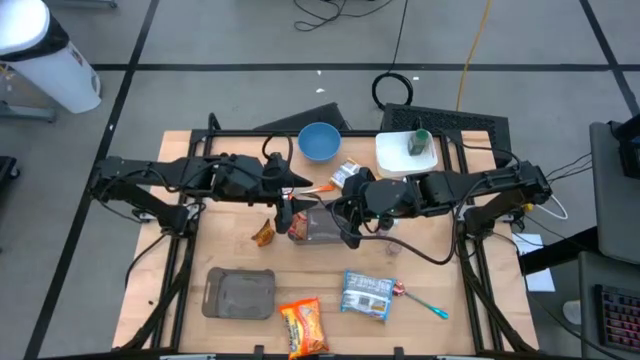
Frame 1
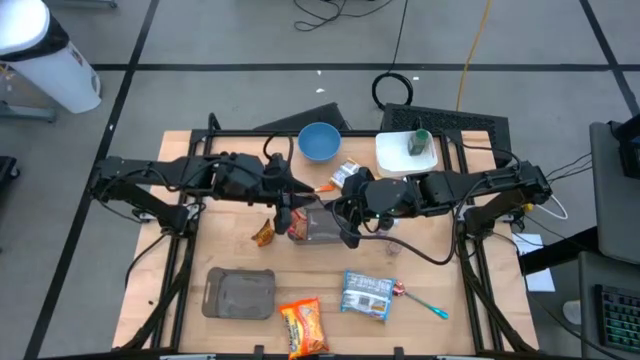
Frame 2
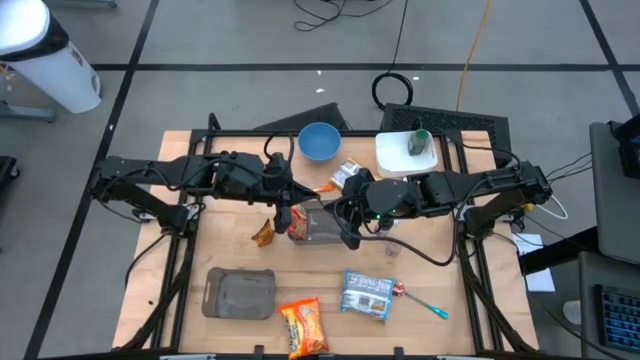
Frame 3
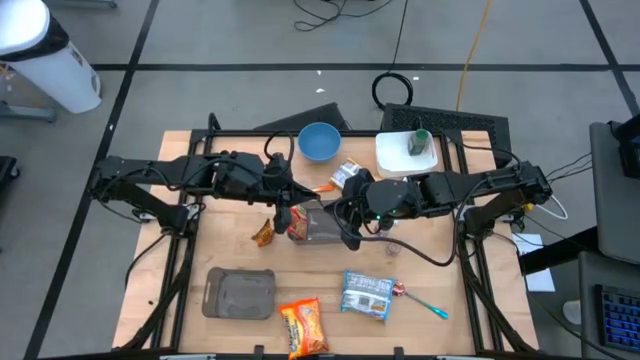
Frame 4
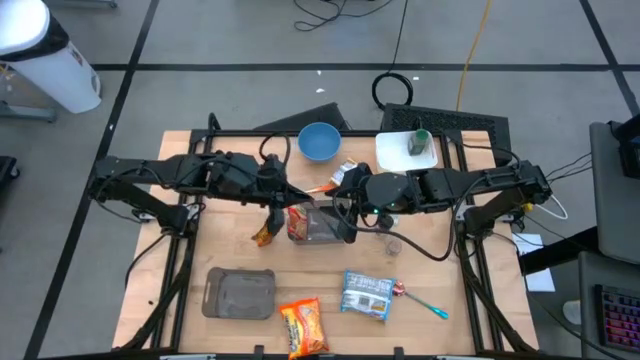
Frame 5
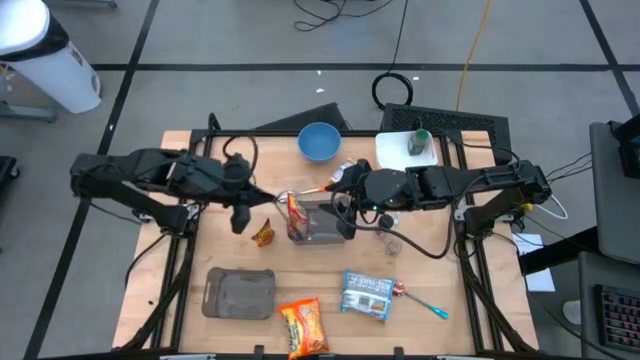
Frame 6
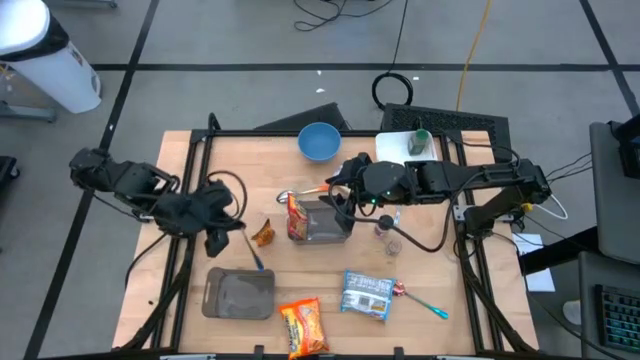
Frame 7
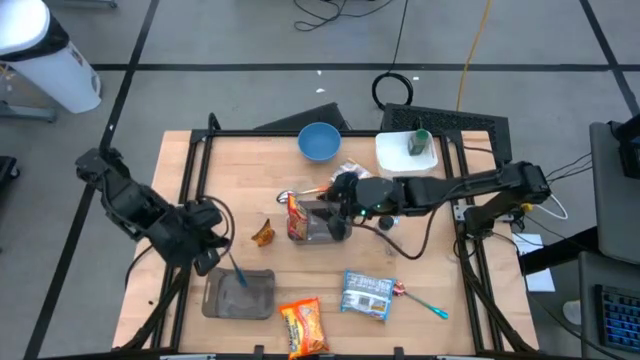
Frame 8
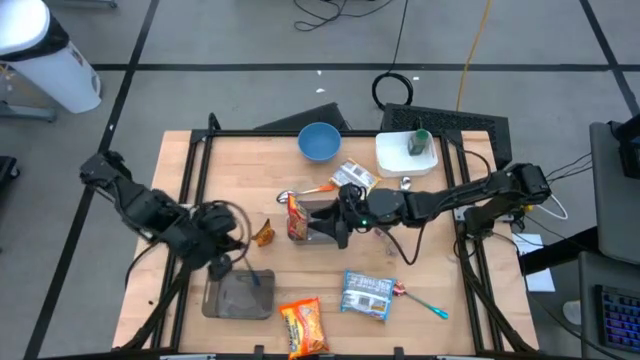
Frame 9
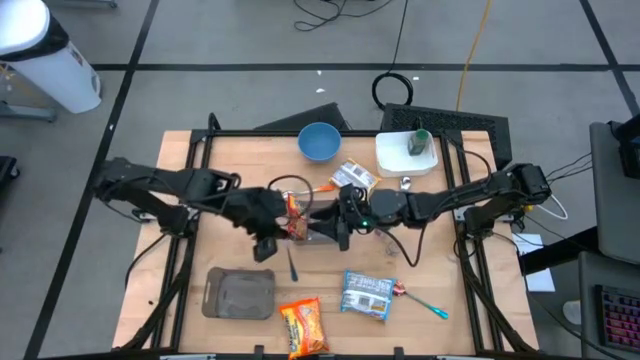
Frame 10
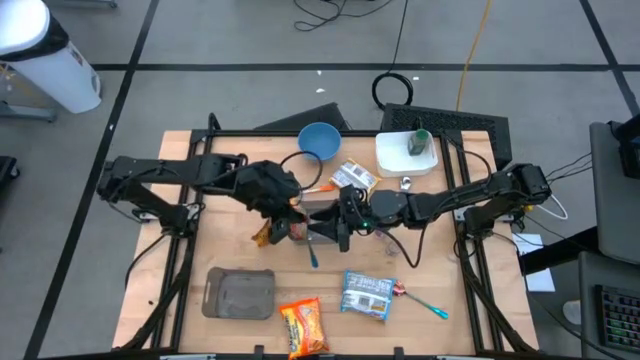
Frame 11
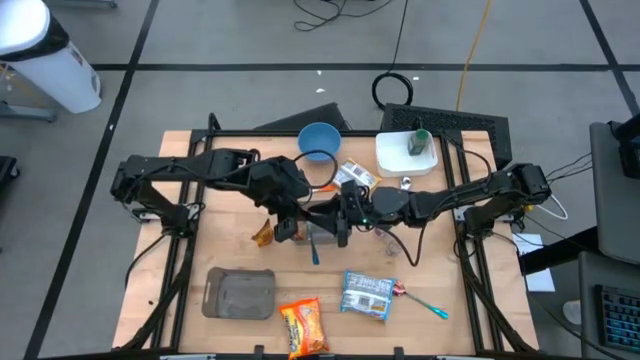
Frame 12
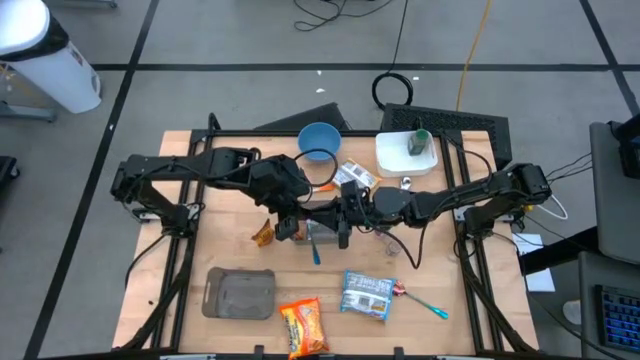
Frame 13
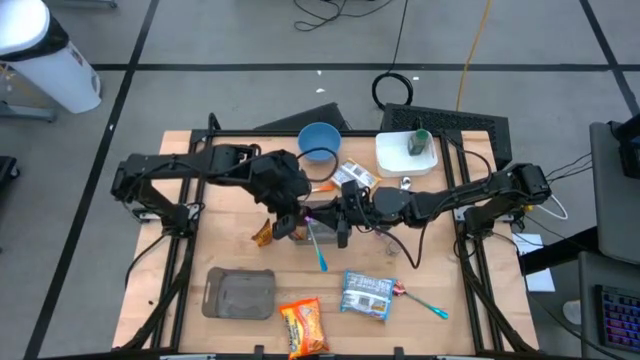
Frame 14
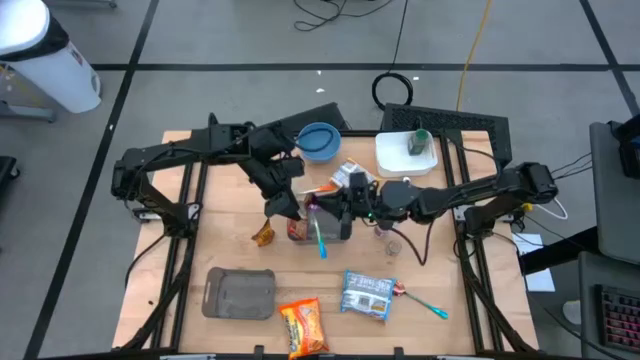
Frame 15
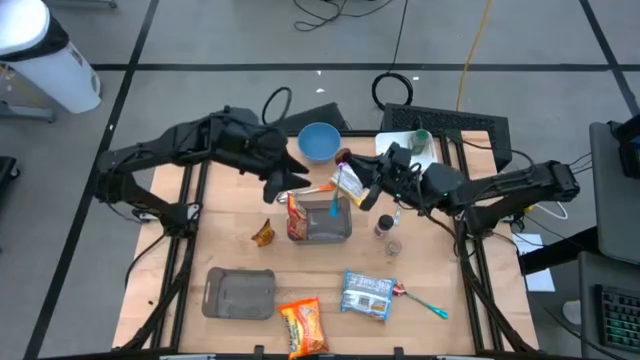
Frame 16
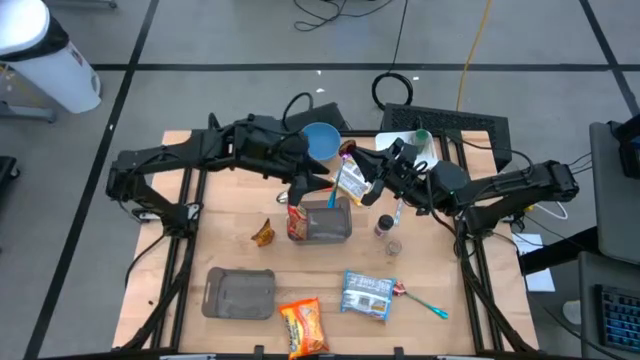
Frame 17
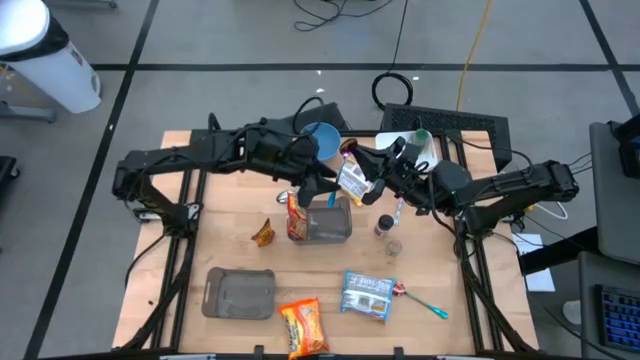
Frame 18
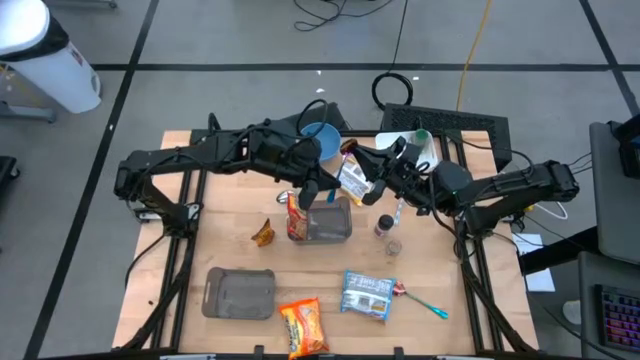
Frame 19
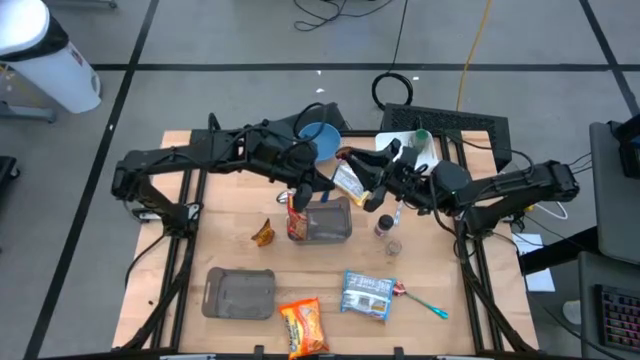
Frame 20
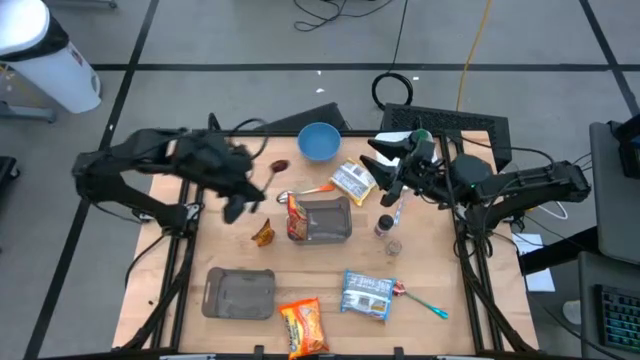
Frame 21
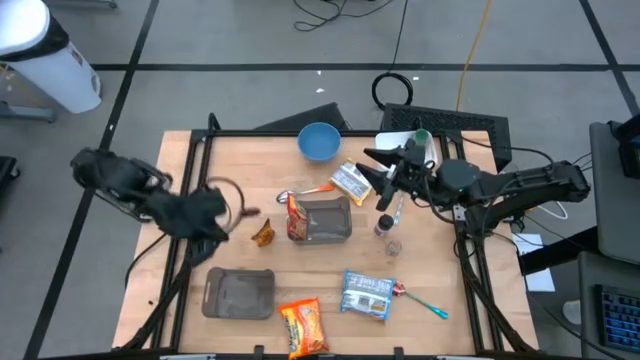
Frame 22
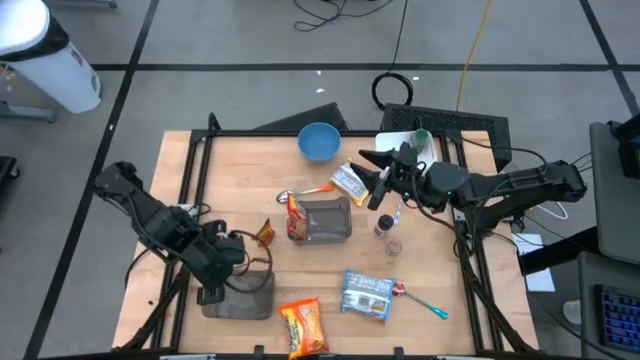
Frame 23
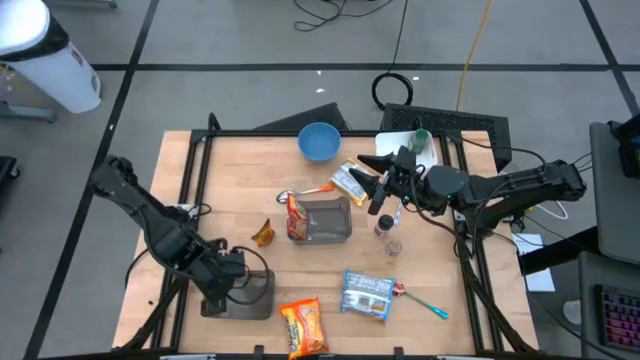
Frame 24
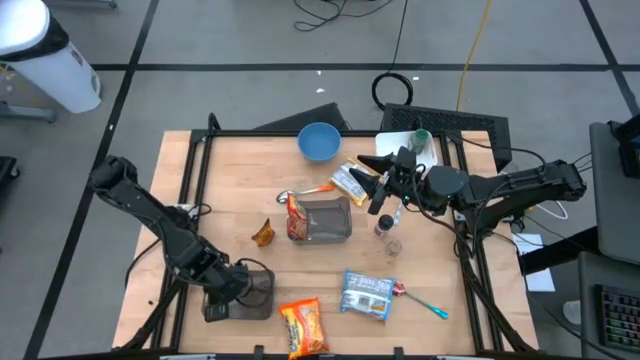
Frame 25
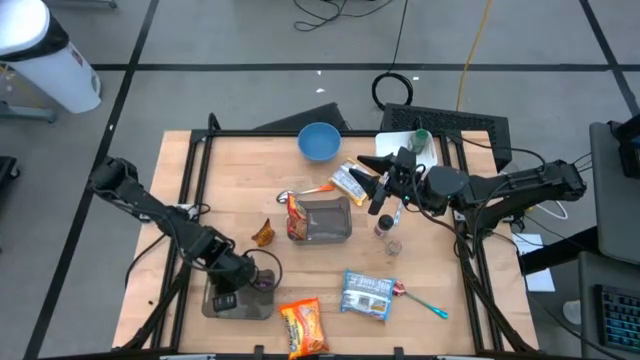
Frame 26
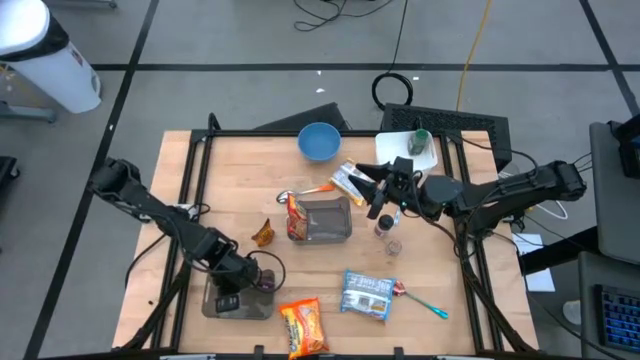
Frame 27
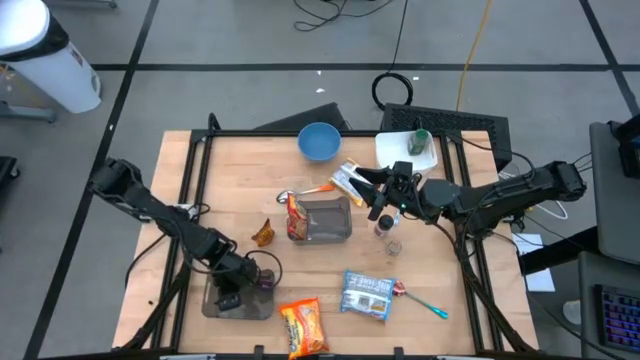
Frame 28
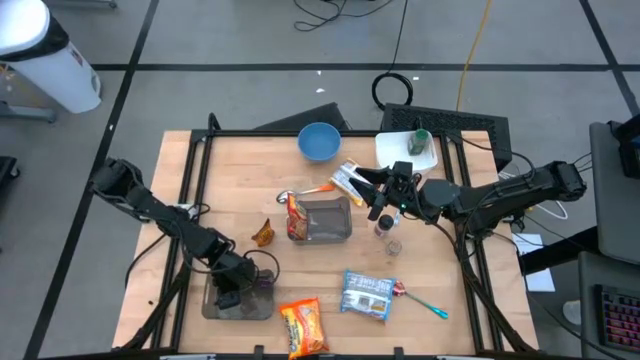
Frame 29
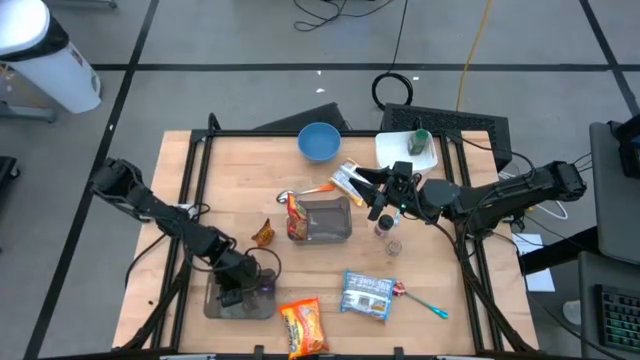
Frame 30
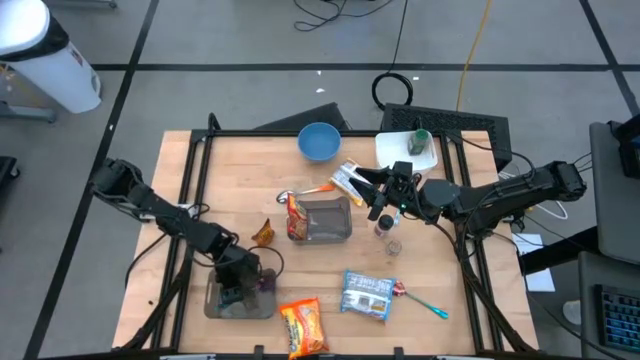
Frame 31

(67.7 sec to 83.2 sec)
Task: Pick & Place Food Item
Put the left blue spoon into the bottom black bin

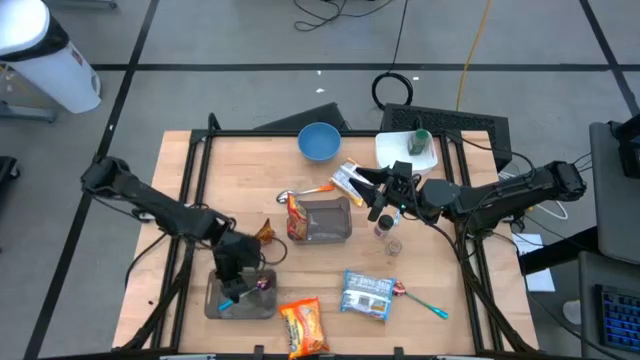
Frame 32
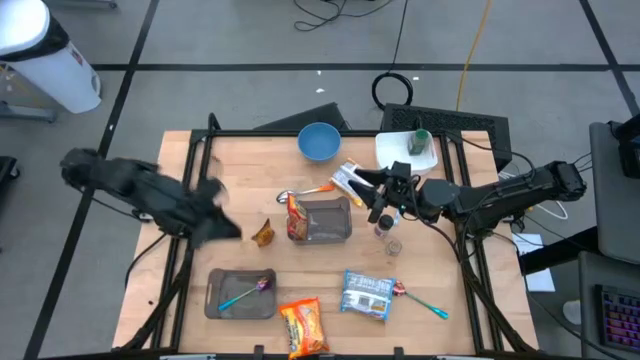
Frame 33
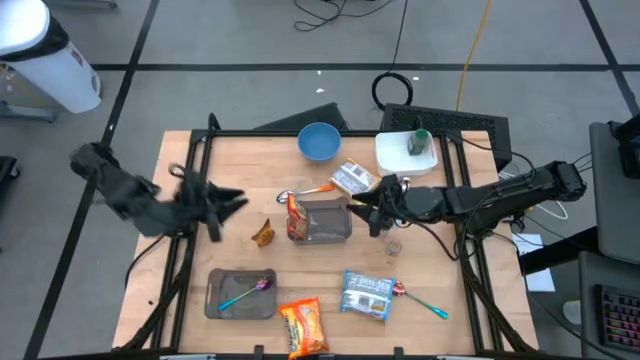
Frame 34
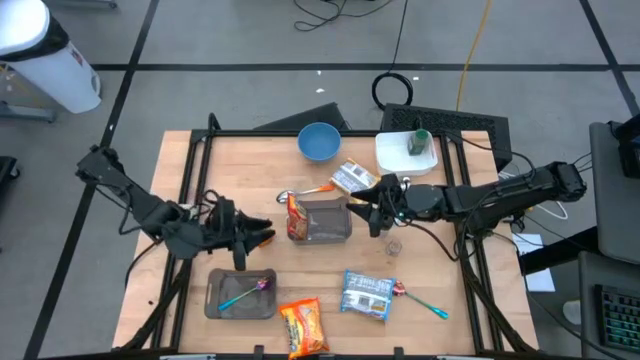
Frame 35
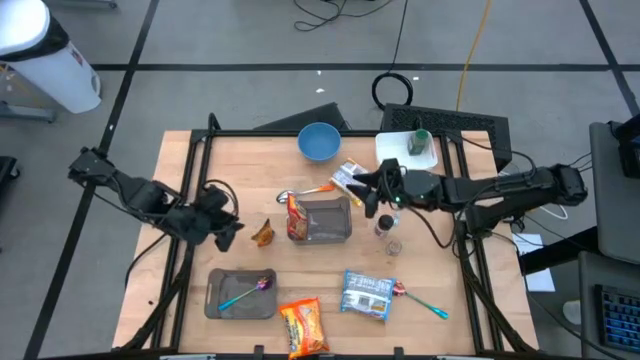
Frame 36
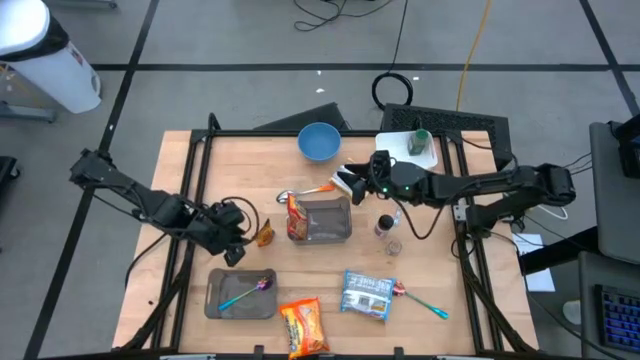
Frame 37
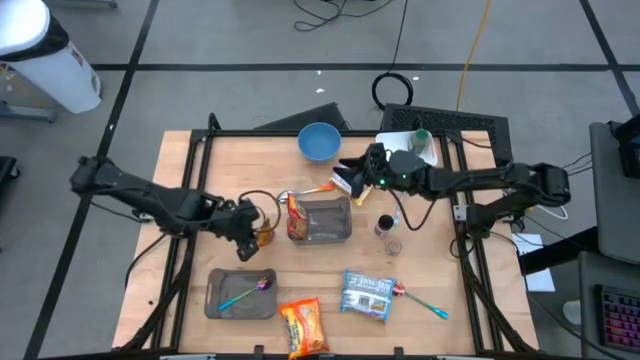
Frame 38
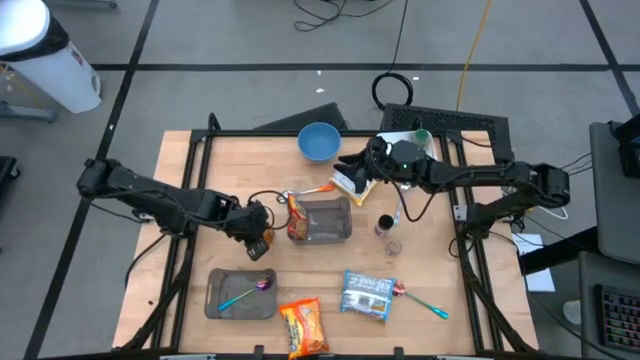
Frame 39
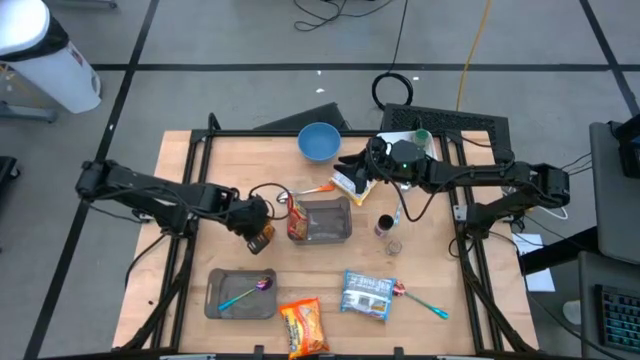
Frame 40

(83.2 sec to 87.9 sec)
Put the seasoning pack into the white bin
